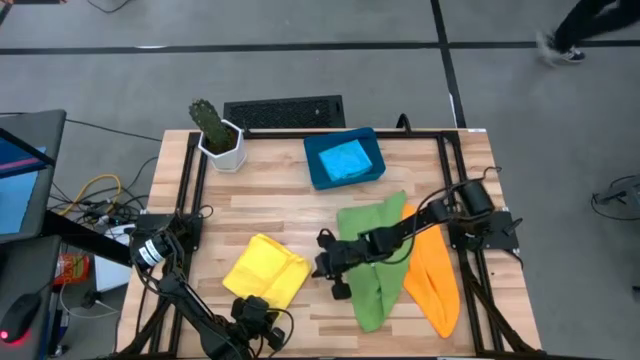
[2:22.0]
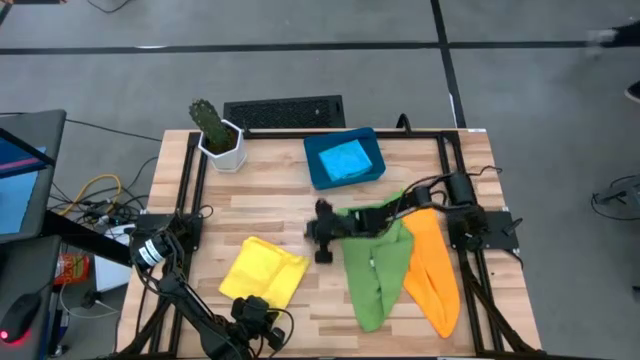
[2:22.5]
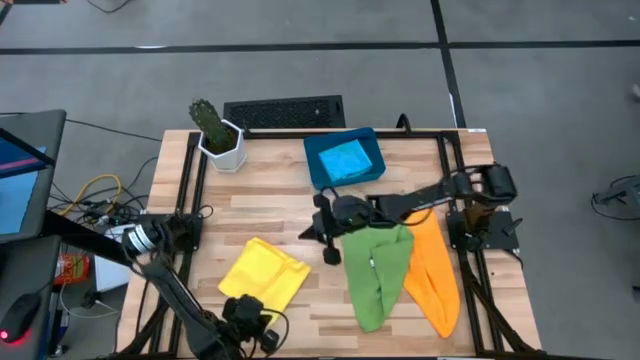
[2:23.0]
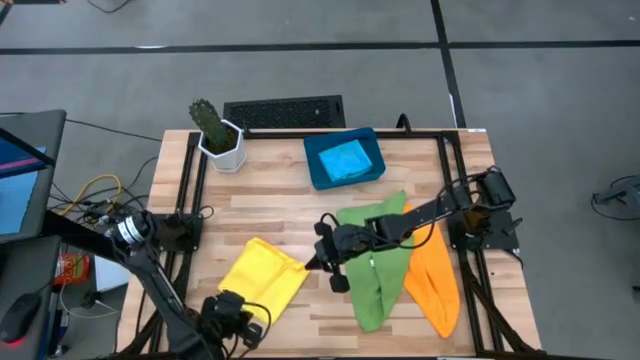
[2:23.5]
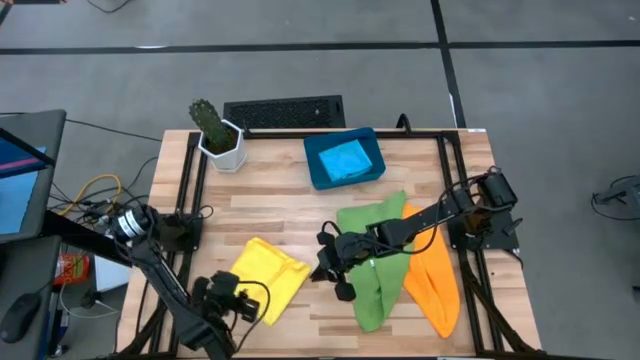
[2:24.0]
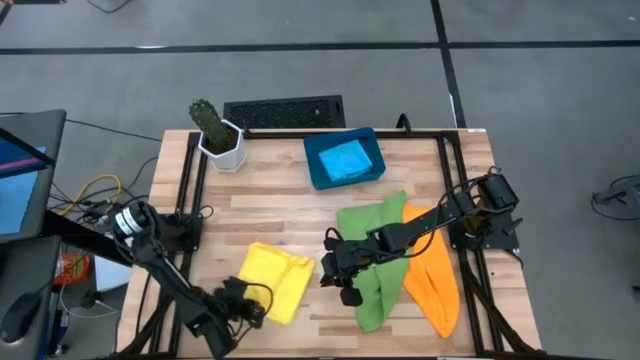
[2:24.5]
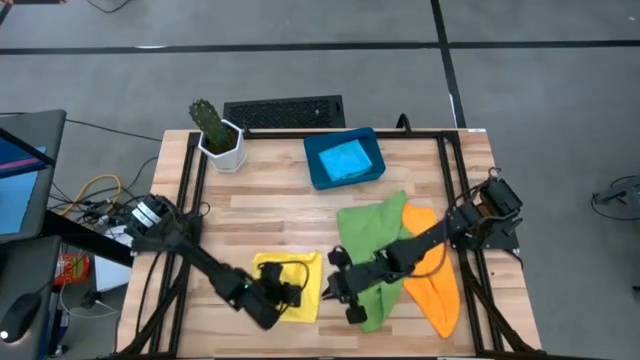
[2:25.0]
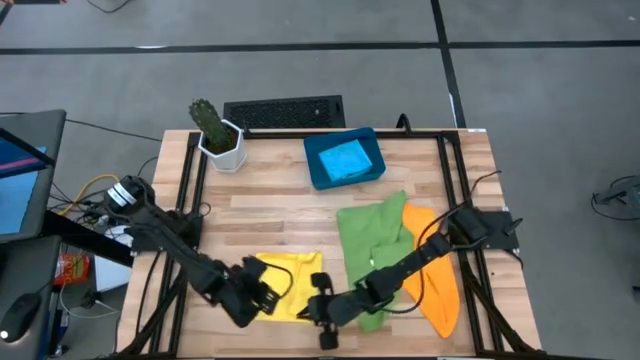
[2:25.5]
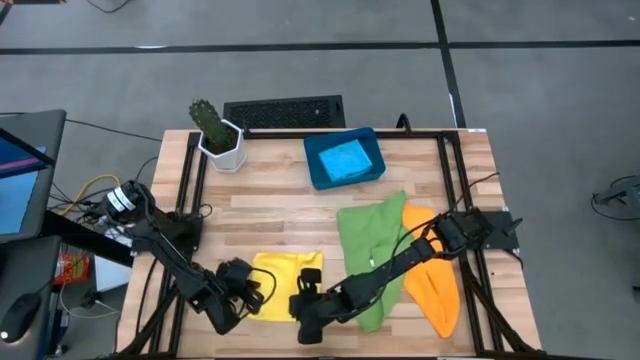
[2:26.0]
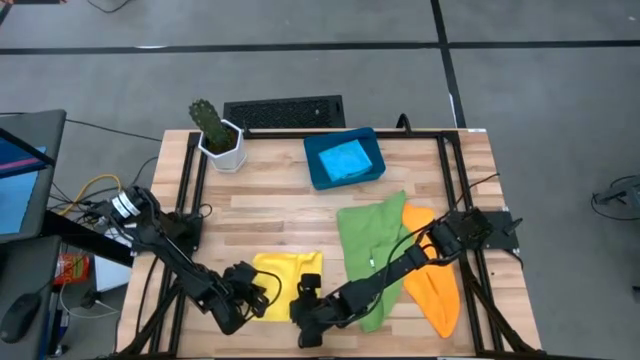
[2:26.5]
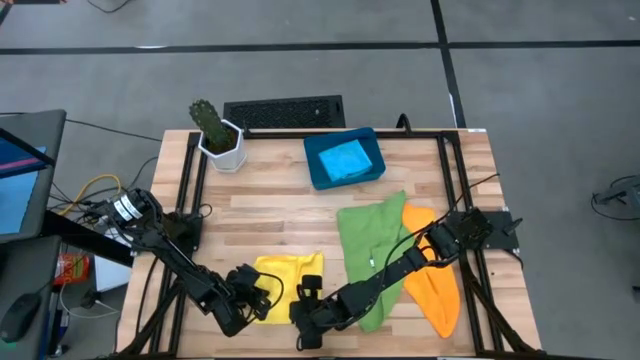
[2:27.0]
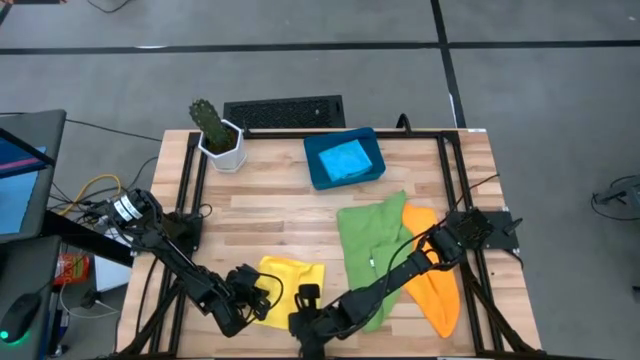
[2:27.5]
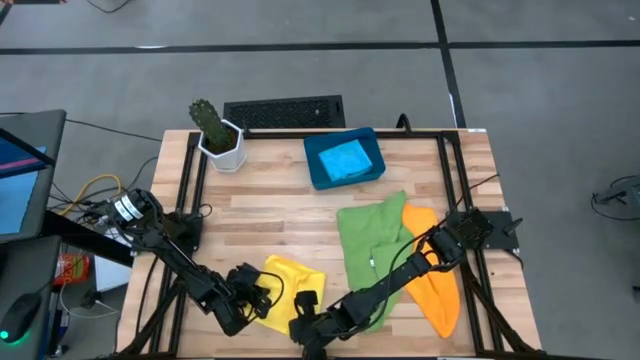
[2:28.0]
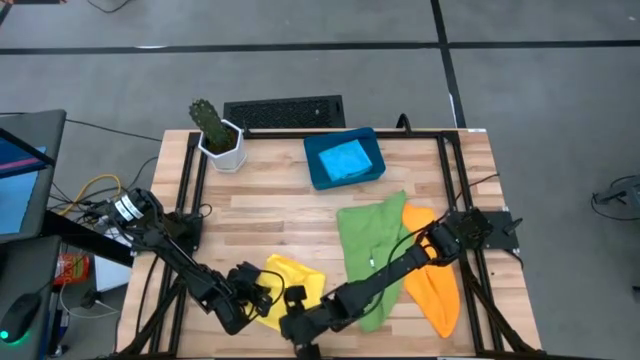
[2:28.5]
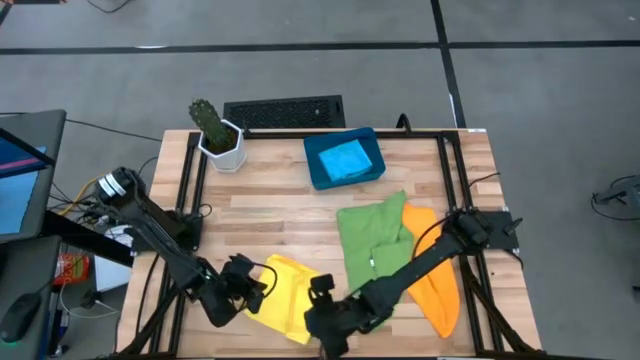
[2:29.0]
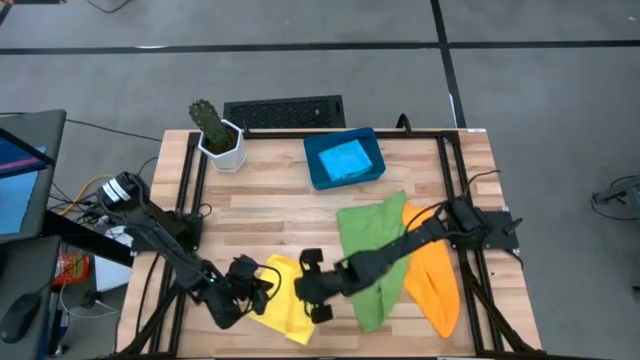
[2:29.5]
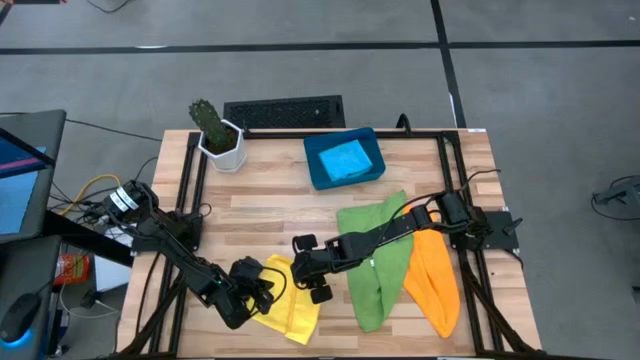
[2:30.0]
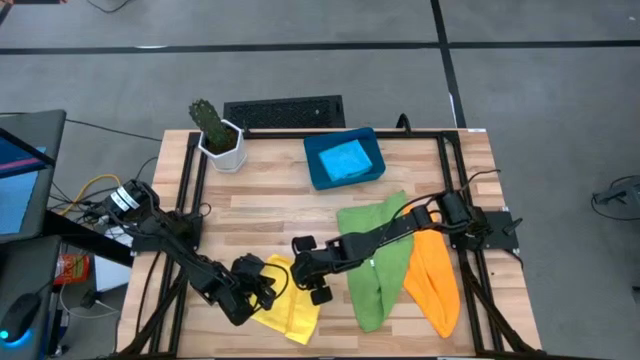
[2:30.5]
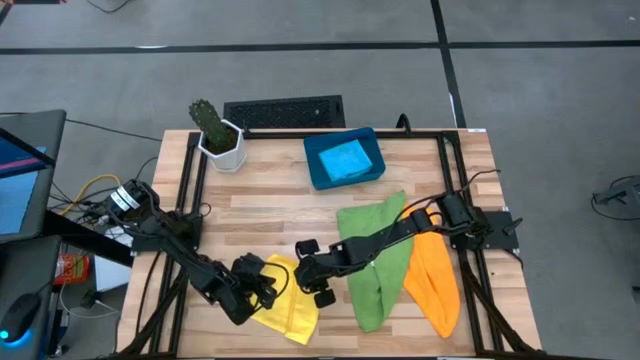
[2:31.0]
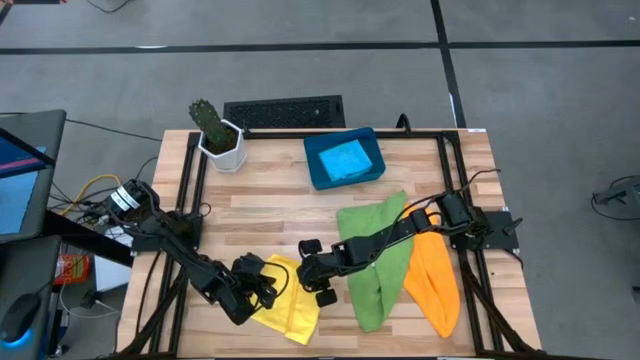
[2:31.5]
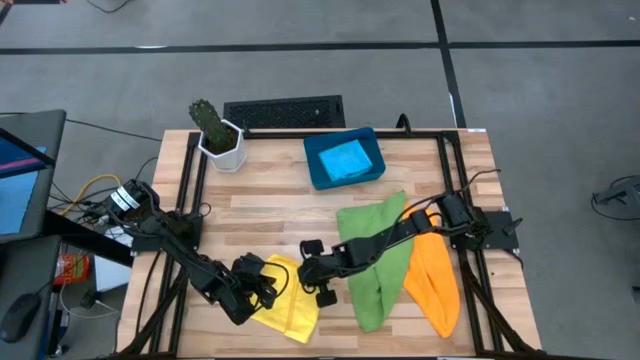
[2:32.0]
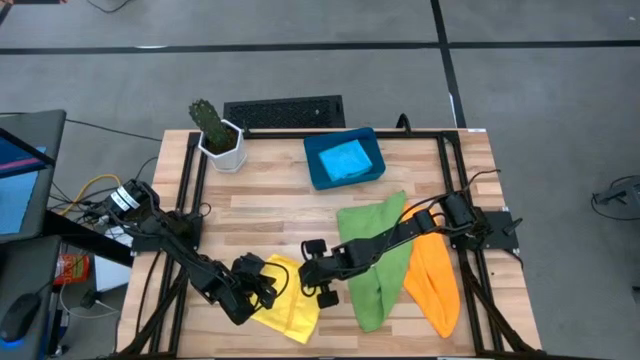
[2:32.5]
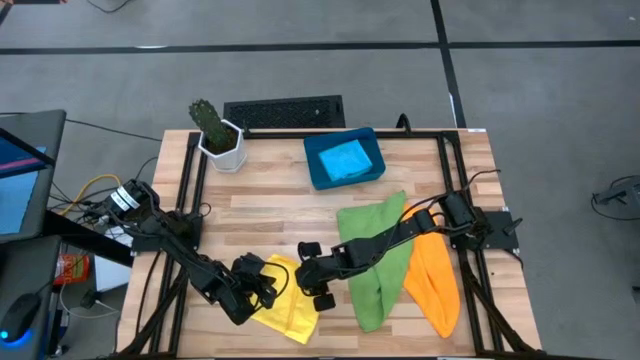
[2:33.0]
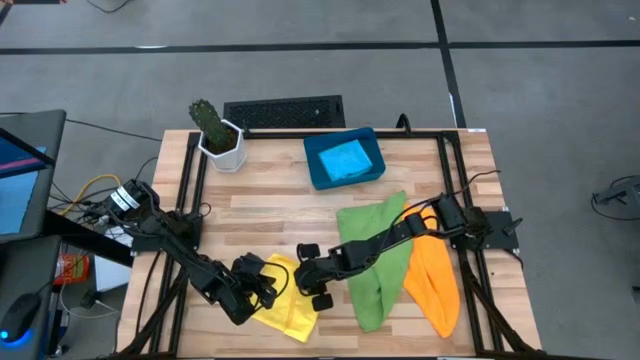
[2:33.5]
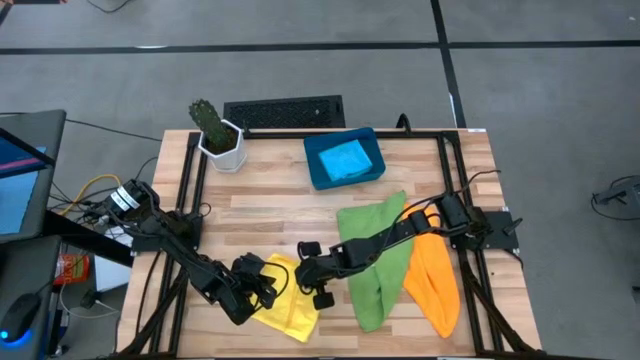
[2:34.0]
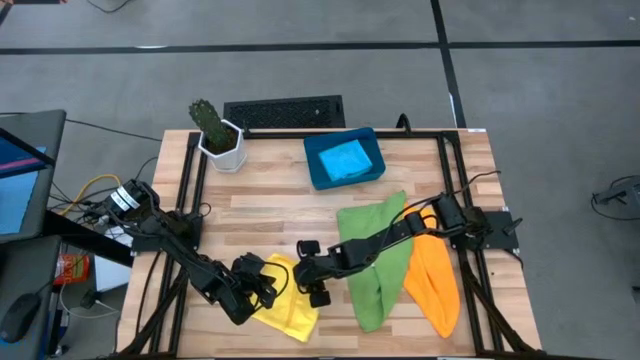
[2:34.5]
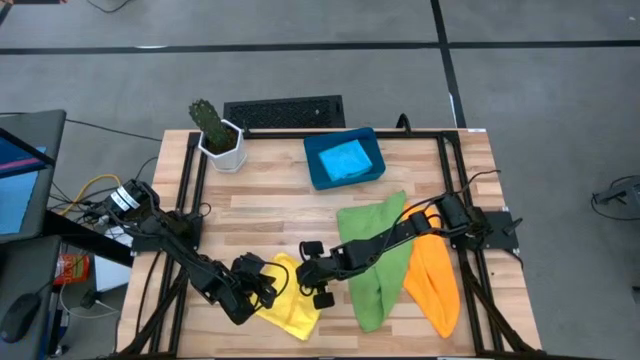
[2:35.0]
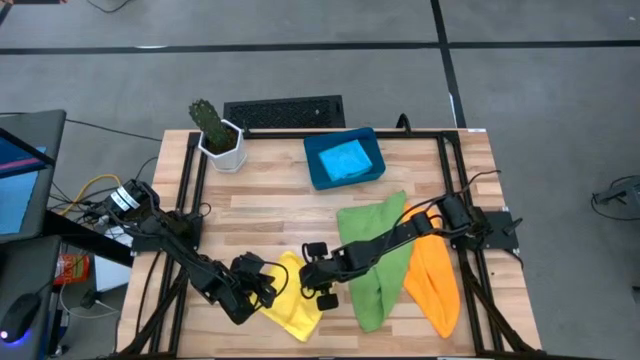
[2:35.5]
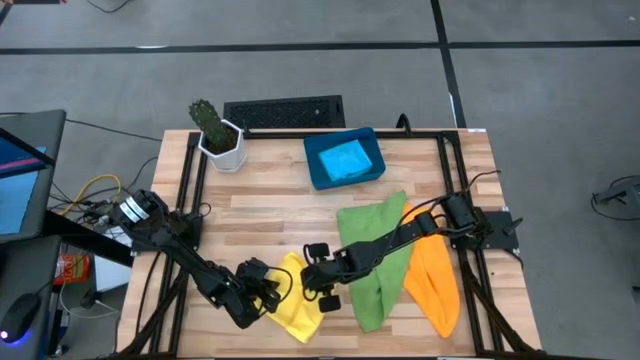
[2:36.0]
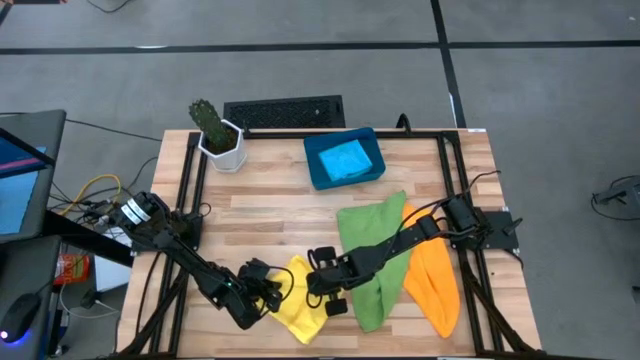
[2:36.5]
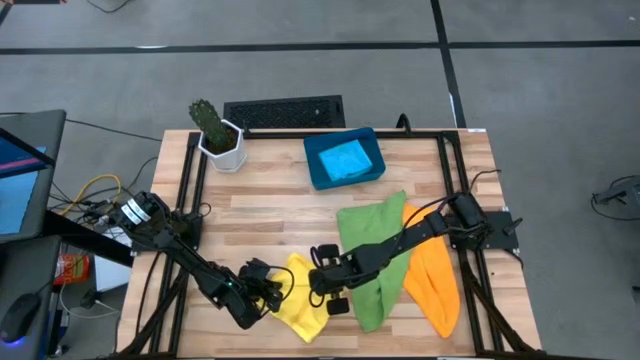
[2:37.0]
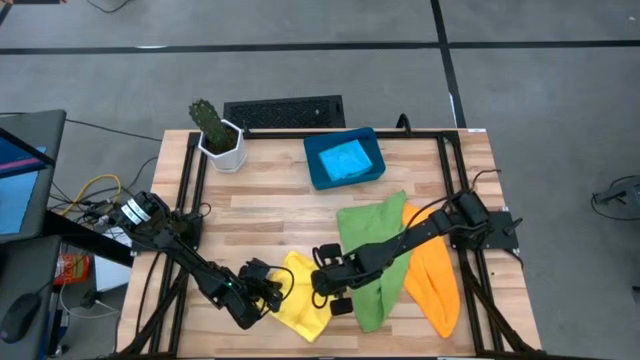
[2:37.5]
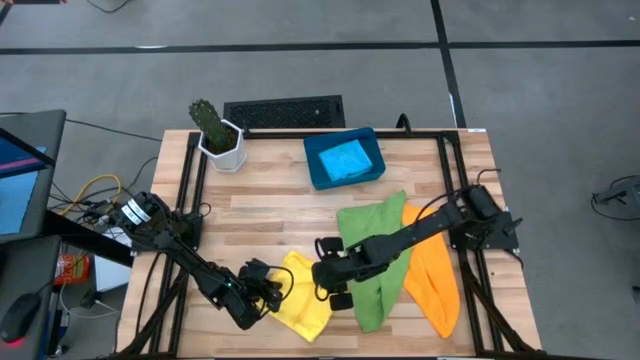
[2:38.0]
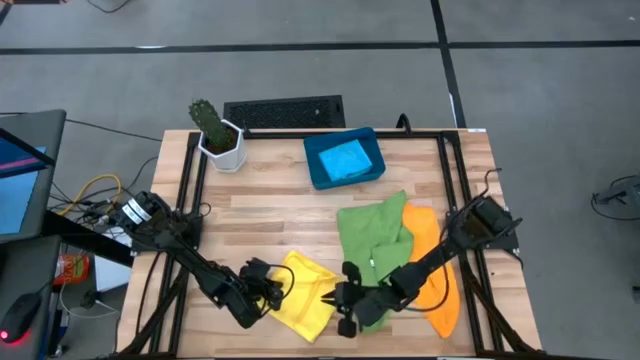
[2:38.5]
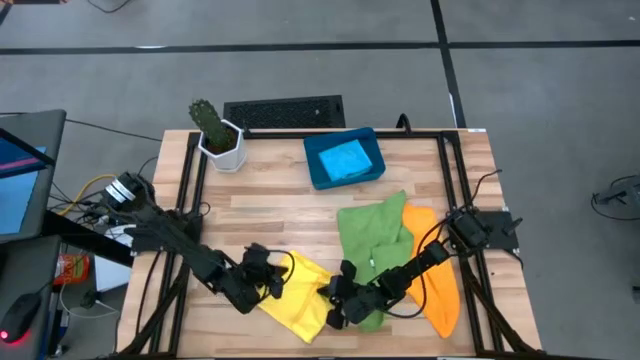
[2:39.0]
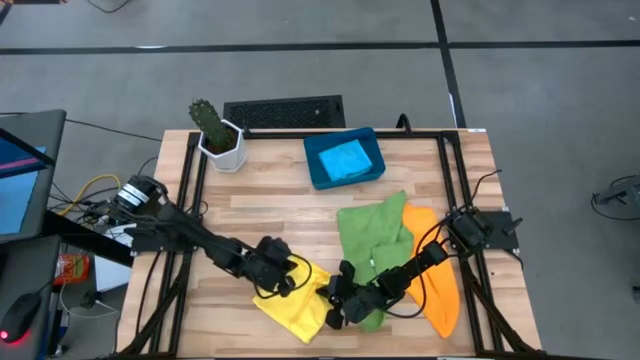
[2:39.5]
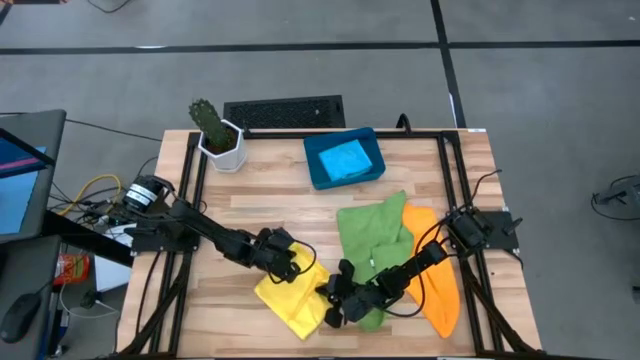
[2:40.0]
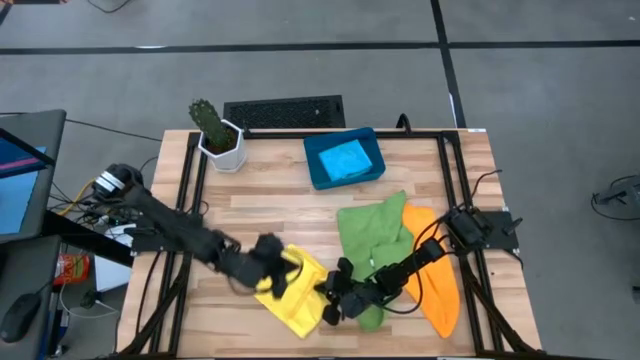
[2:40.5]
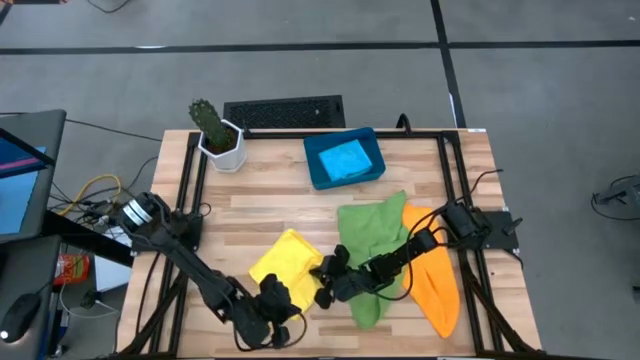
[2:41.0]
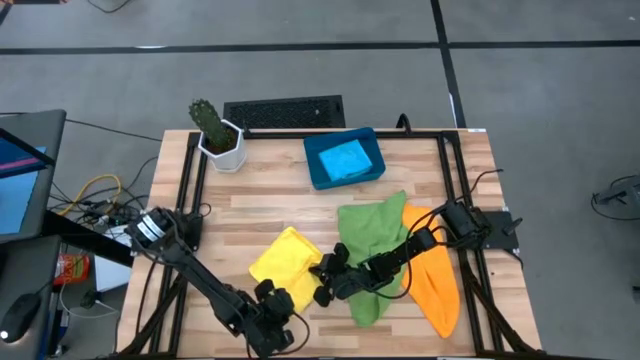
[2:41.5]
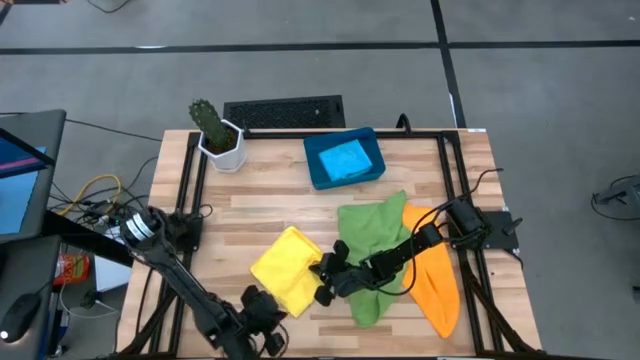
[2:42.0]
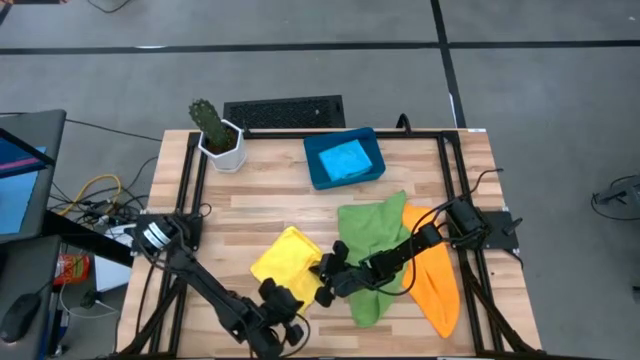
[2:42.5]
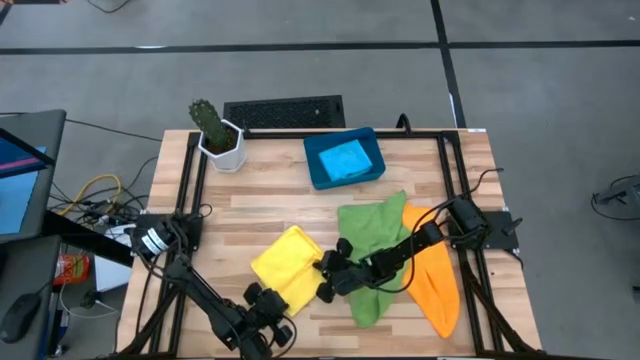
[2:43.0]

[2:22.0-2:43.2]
Task: Fold microfiber towels
Fold the yellow microfiber cloth
